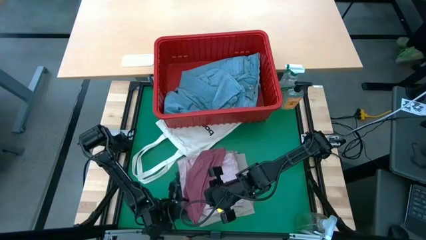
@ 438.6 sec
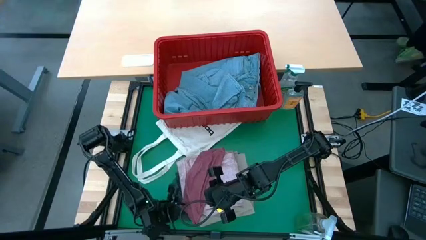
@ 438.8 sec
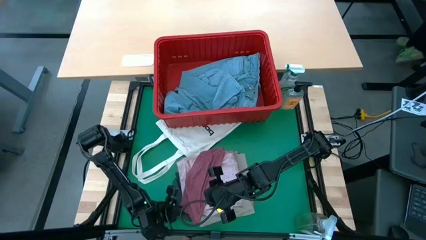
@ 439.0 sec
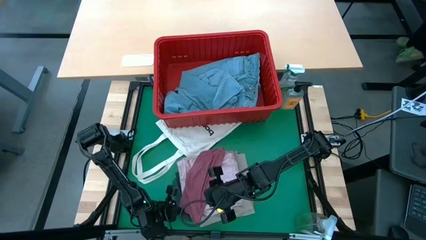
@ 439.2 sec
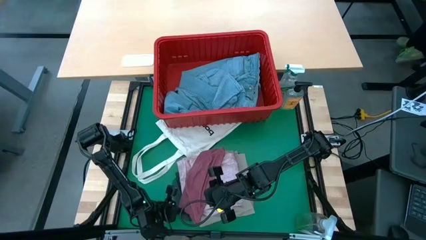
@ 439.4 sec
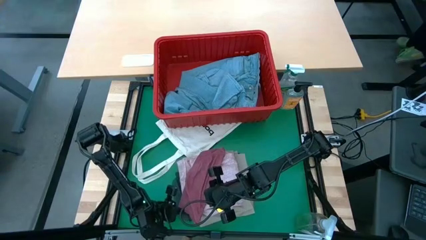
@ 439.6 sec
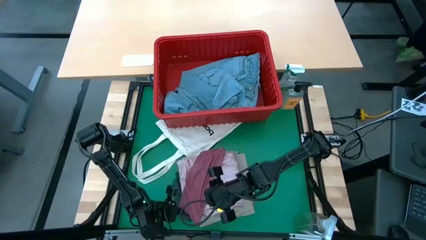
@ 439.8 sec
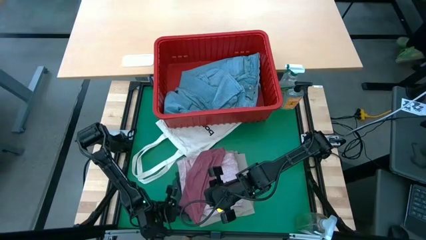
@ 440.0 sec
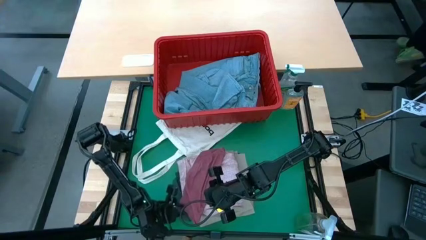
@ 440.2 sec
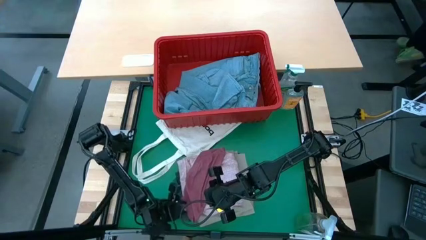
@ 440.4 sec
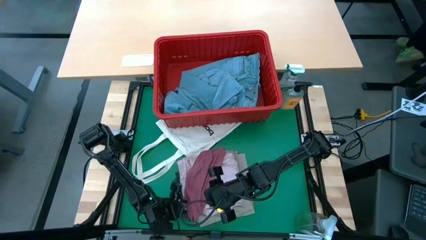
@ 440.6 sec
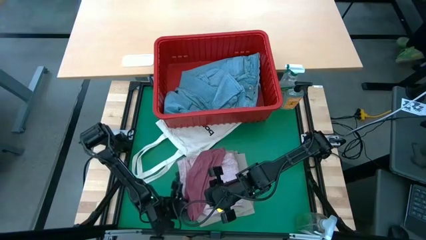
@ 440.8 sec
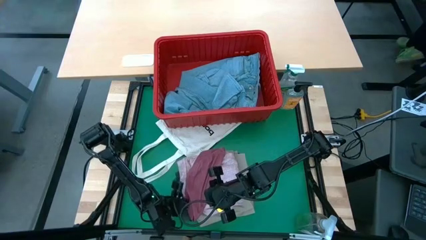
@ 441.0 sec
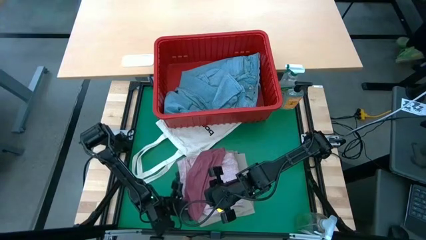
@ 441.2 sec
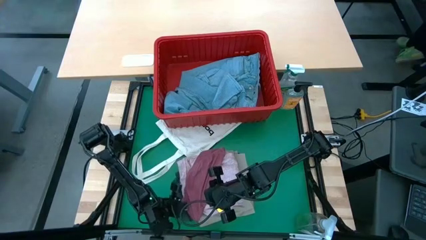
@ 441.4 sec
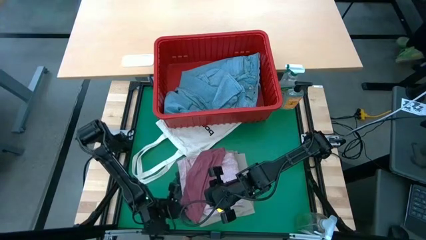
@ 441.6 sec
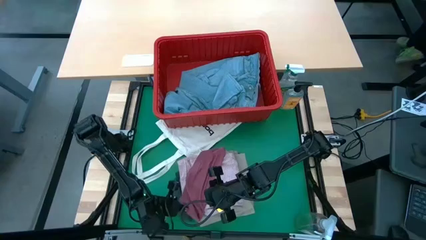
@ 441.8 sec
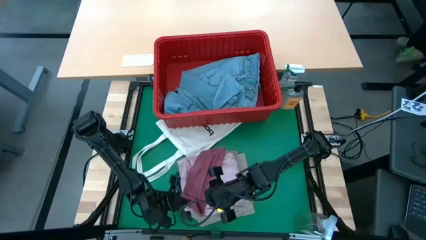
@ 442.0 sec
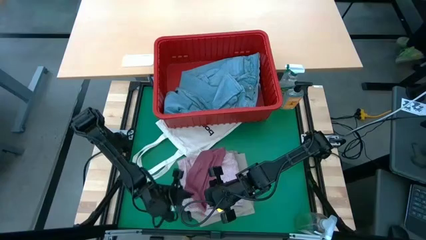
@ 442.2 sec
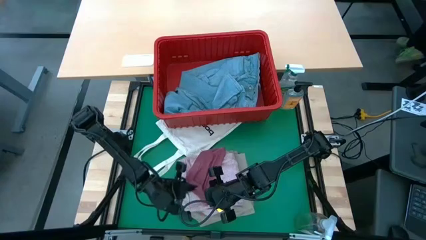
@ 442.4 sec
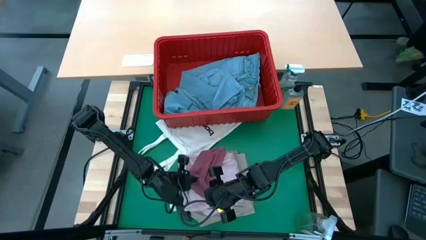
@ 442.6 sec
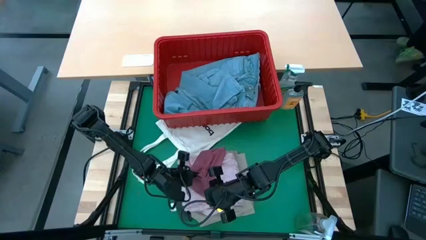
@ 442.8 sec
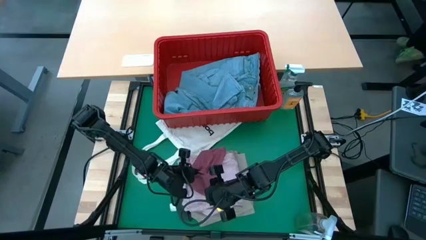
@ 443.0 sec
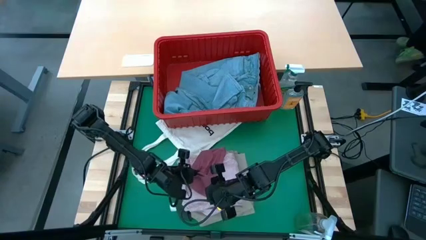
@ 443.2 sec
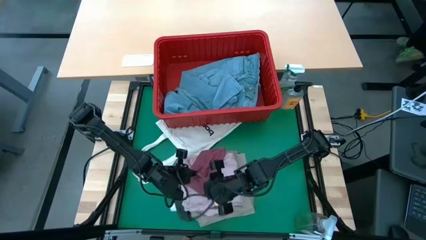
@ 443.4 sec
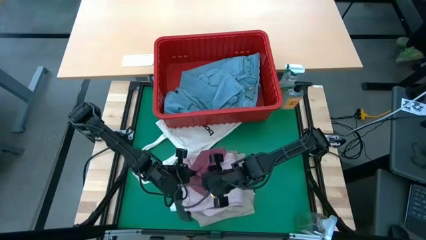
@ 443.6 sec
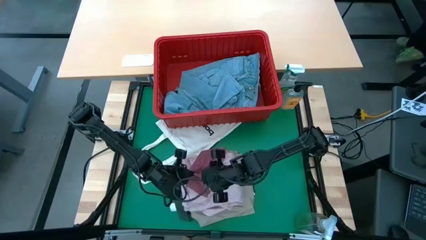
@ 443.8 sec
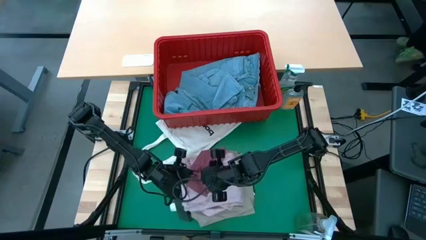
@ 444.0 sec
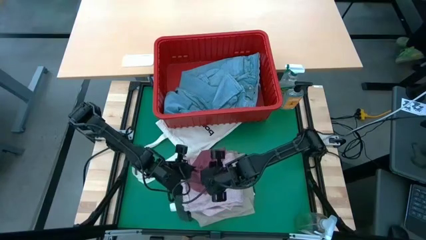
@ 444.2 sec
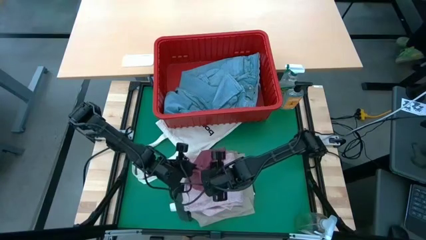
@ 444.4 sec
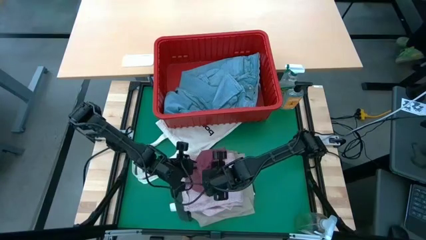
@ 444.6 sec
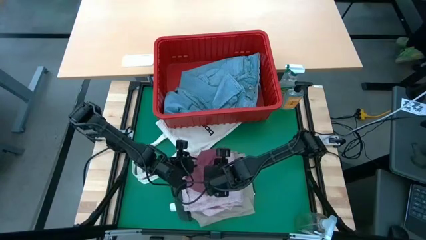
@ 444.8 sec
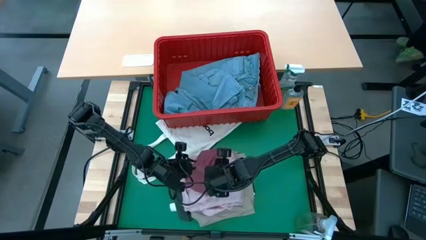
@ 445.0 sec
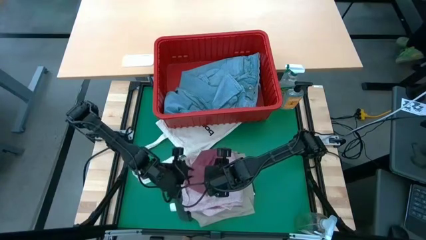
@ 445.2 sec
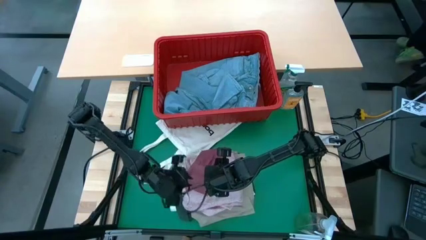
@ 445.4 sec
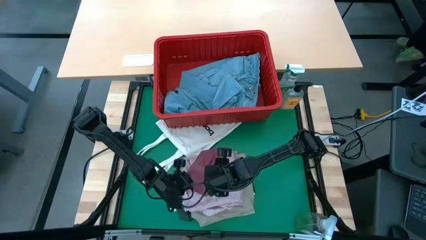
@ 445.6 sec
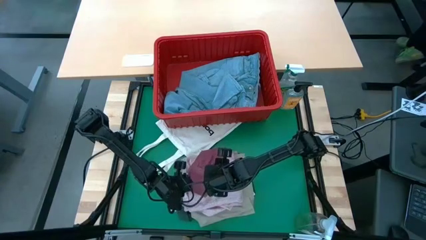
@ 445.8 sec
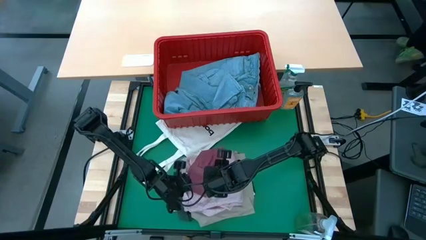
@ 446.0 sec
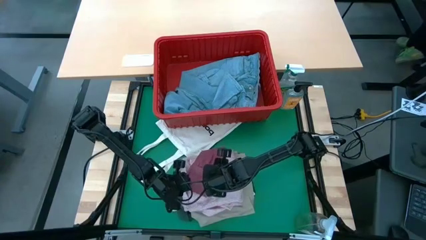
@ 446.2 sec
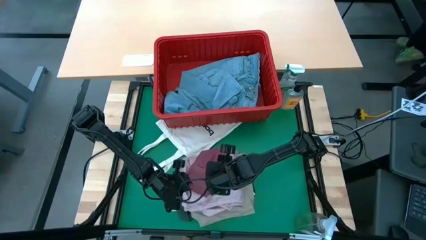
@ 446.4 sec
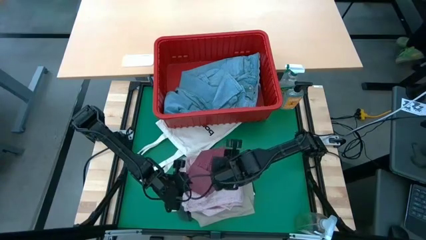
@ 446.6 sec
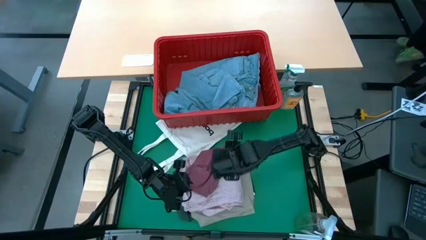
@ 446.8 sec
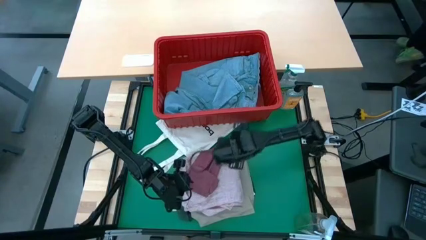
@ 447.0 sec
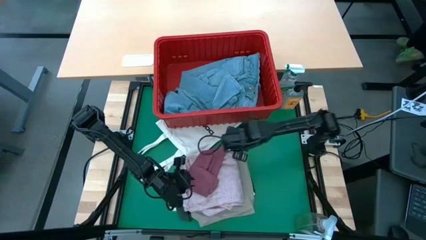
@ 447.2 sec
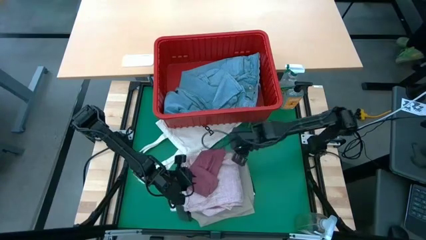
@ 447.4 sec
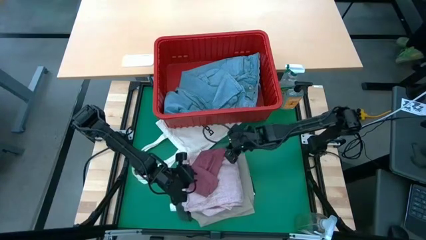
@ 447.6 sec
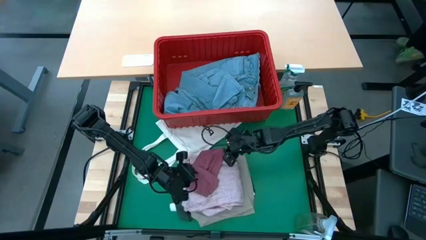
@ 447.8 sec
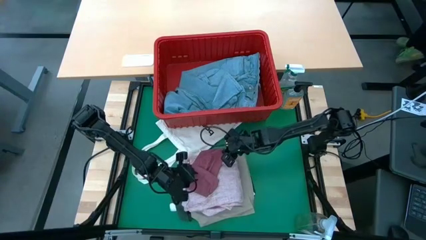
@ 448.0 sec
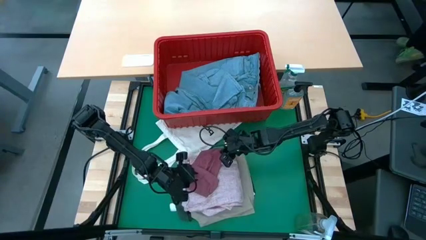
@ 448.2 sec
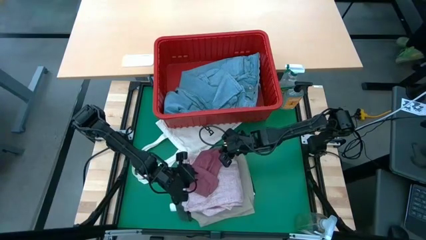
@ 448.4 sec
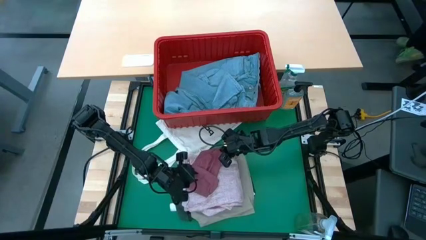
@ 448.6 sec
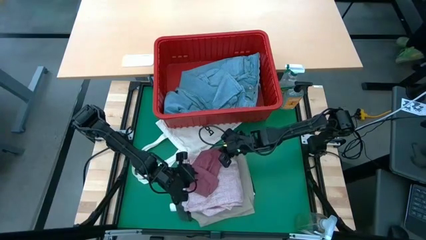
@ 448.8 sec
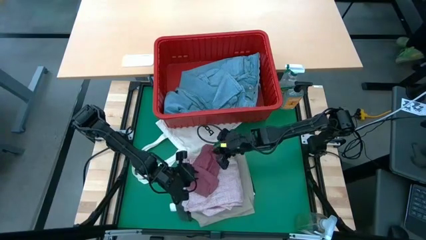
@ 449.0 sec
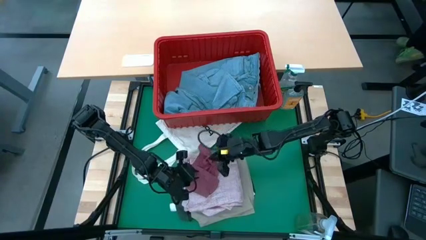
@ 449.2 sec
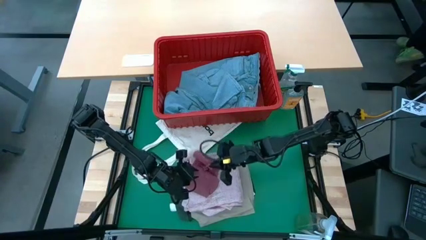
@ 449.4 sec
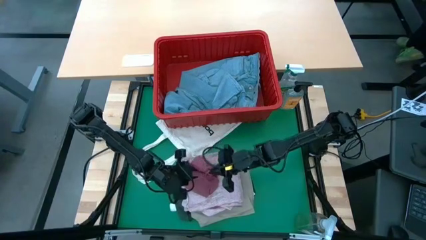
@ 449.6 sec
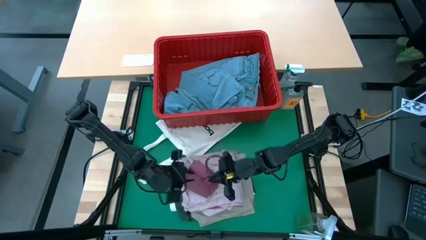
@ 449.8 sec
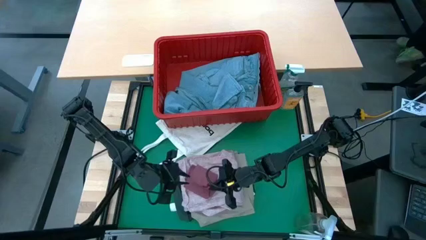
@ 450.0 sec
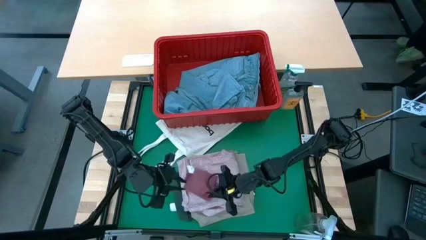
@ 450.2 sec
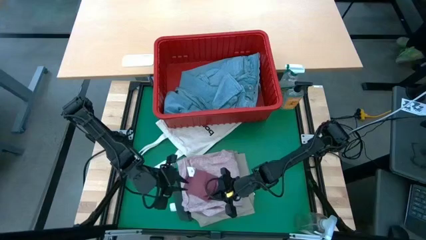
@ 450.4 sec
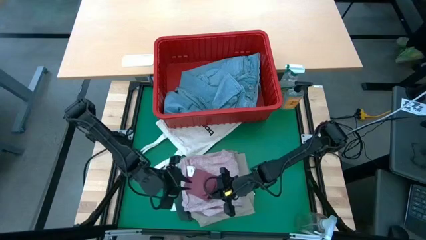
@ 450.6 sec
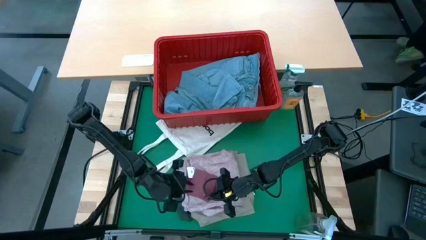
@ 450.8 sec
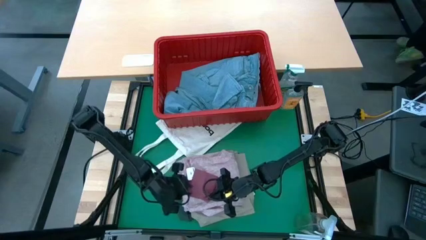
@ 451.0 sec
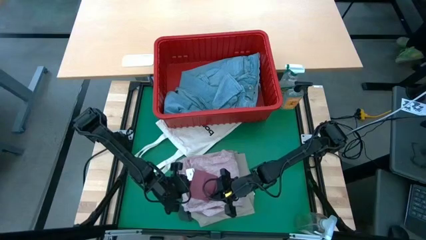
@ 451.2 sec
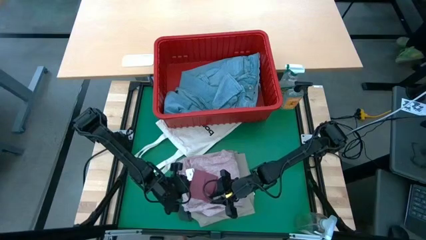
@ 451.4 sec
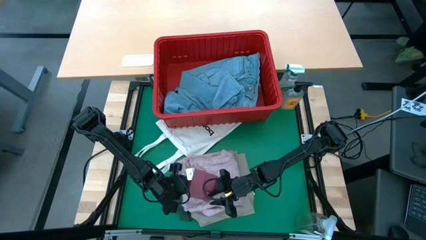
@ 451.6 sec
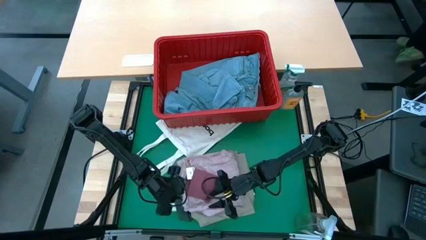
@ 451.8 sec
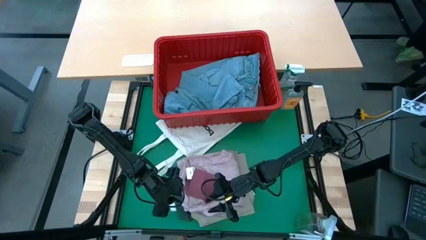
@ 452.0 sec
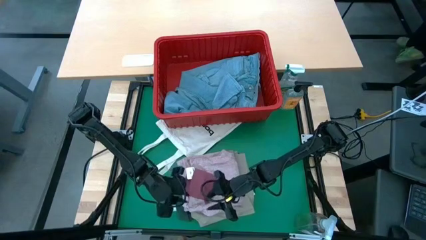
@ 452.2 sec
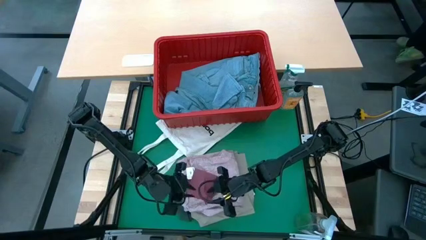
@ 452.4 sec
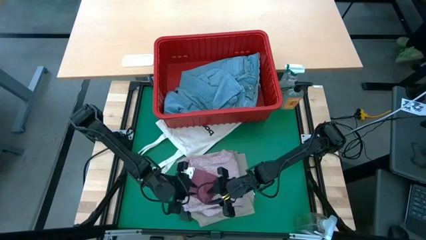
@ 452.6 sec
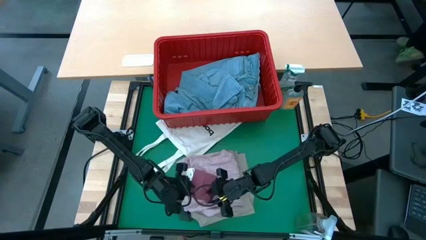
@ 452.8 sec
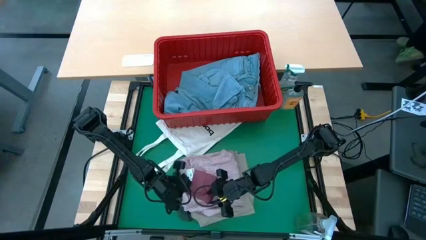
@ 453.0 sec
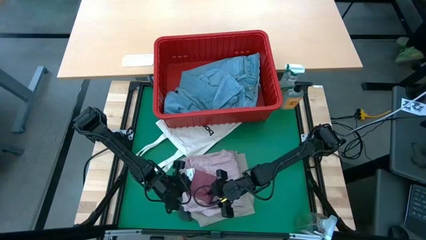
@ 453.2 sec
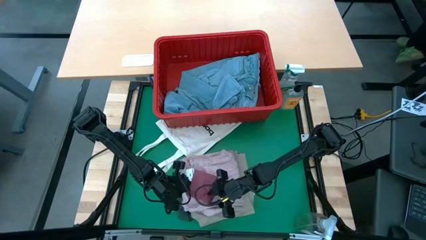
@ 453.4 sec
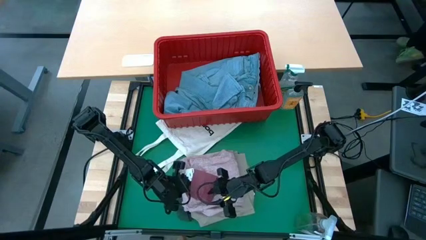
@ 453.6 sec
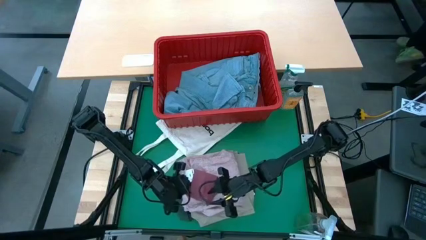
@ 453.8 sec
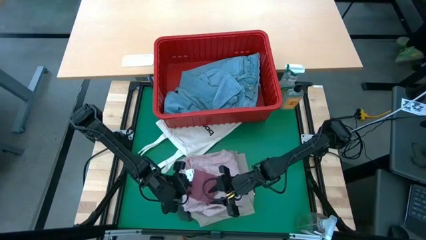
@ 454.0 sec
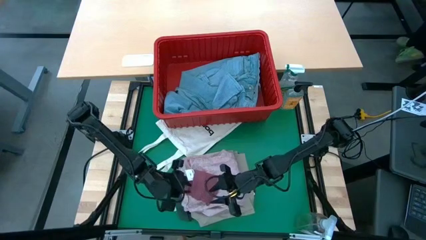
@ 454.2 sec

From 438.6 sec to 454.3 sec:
Task: Fold laundry
Fold the purple panty
